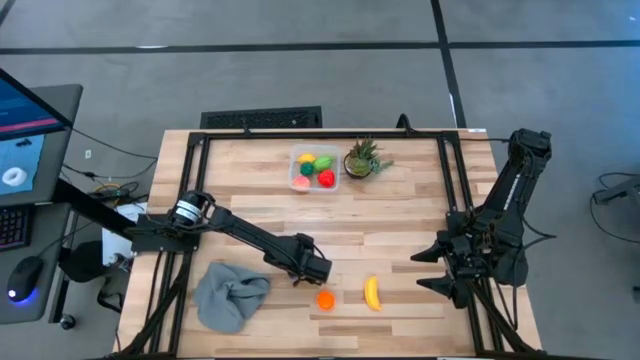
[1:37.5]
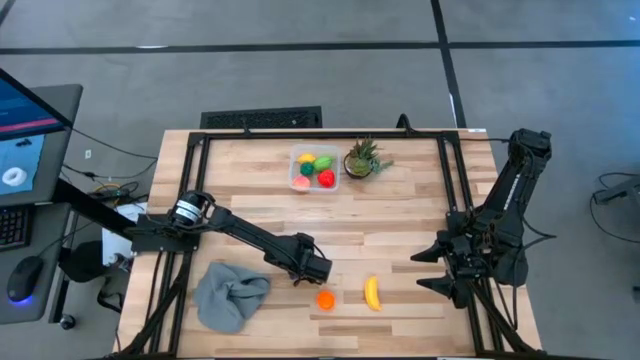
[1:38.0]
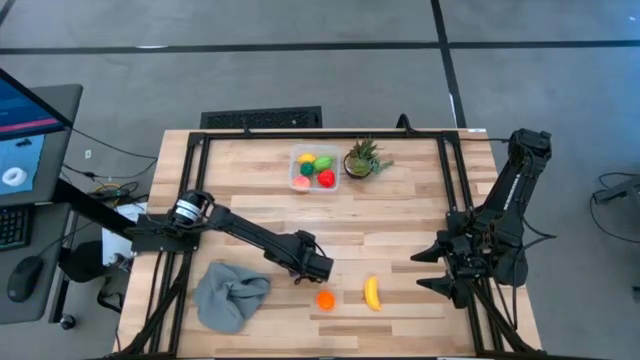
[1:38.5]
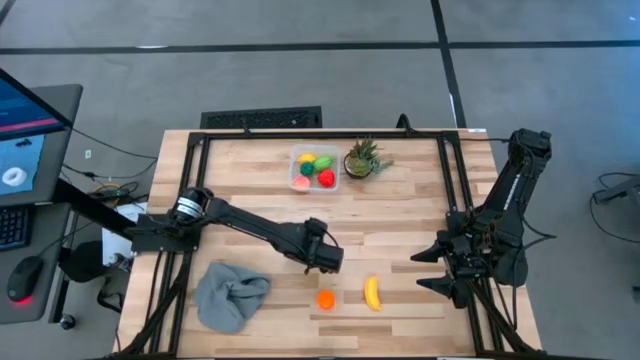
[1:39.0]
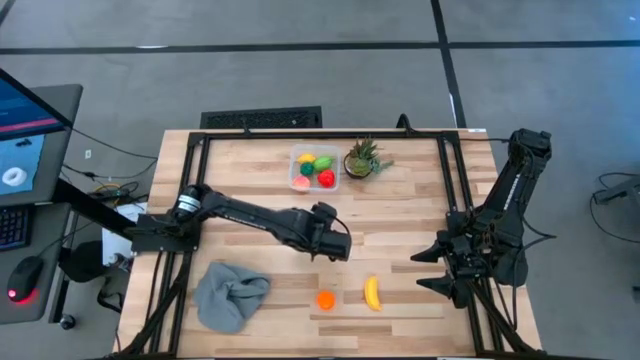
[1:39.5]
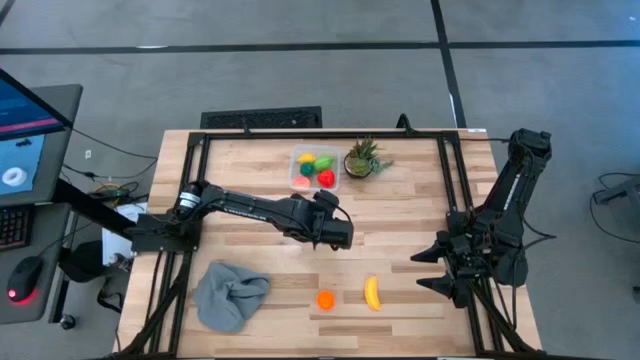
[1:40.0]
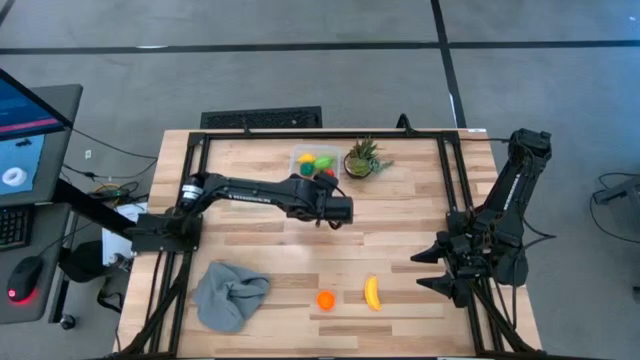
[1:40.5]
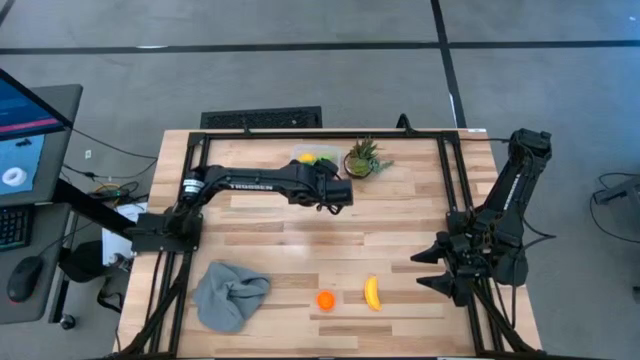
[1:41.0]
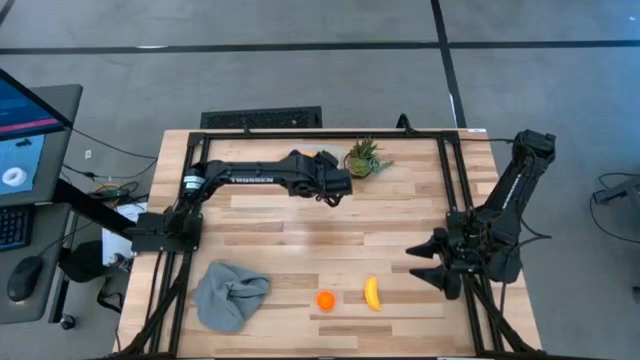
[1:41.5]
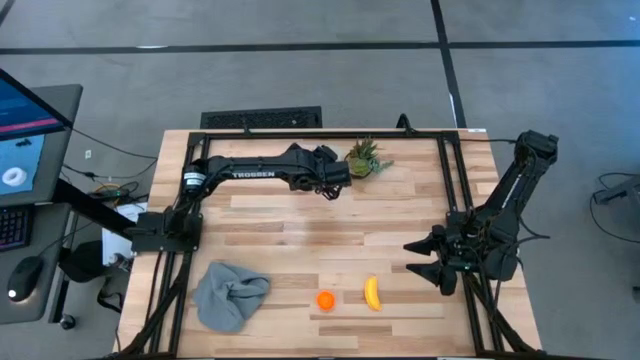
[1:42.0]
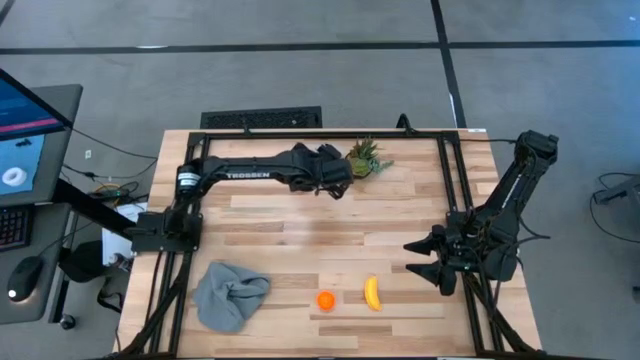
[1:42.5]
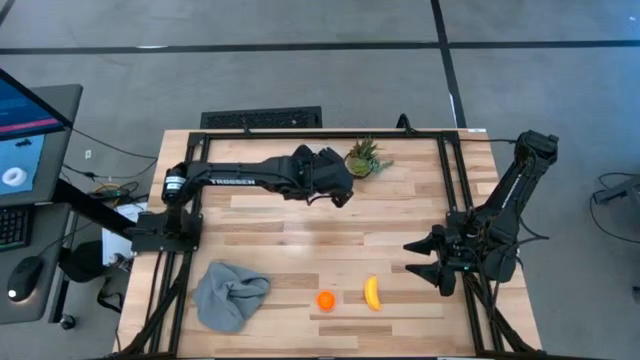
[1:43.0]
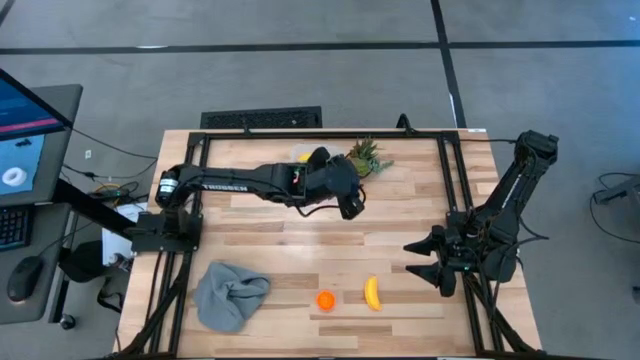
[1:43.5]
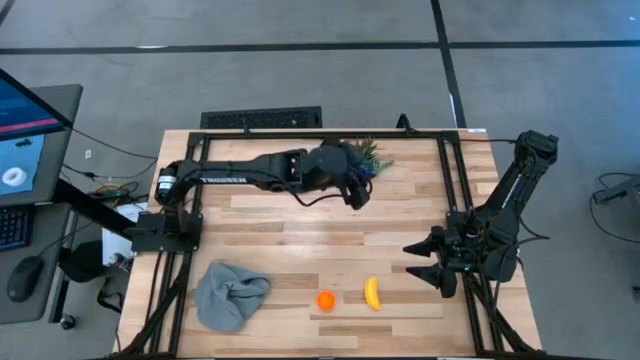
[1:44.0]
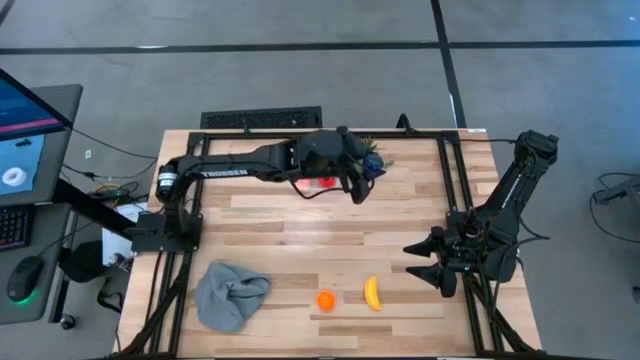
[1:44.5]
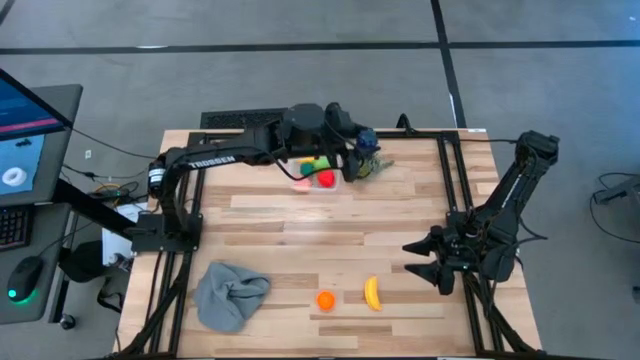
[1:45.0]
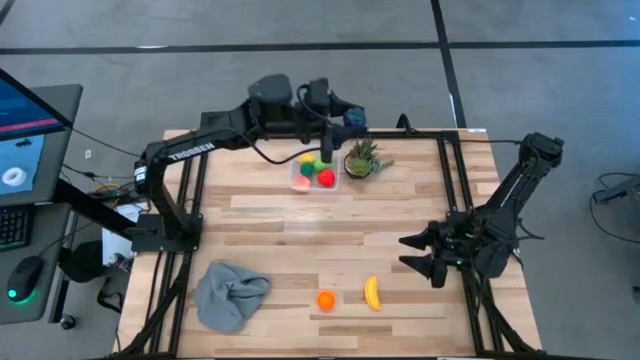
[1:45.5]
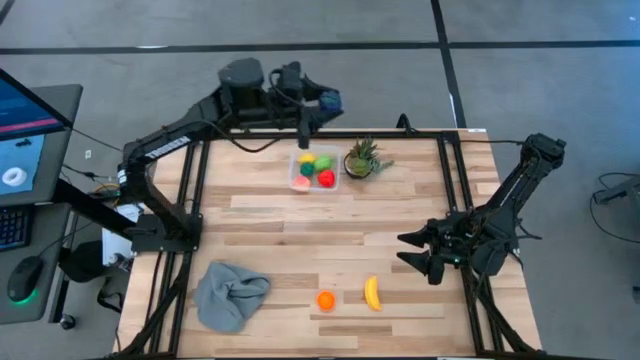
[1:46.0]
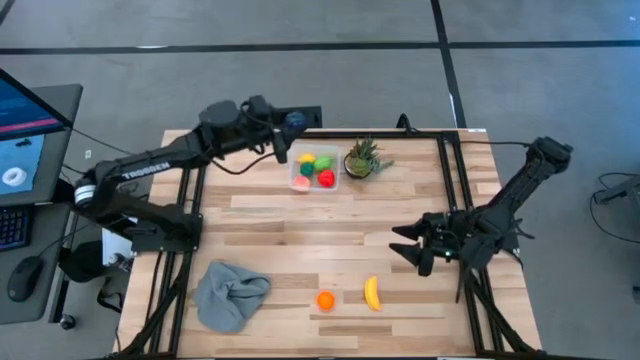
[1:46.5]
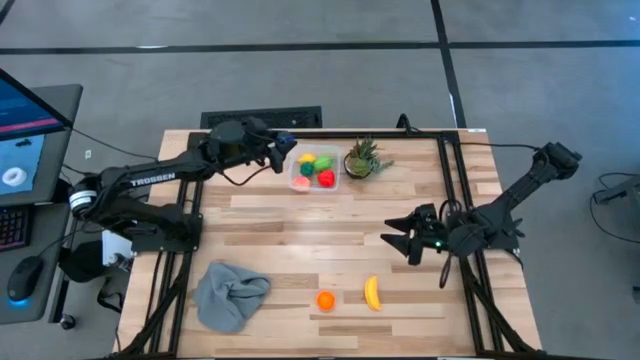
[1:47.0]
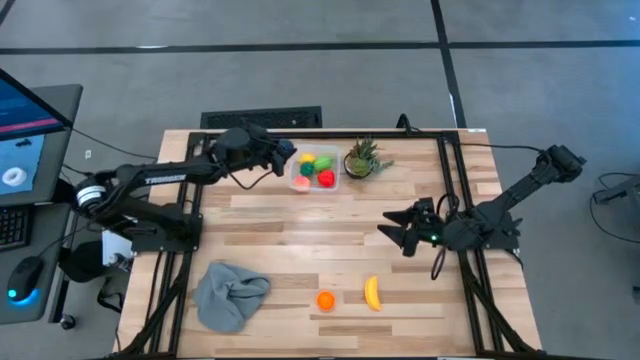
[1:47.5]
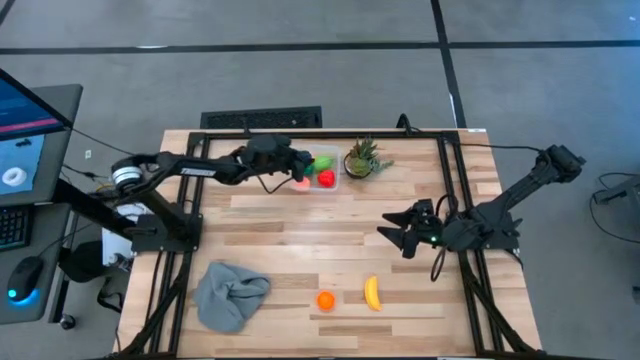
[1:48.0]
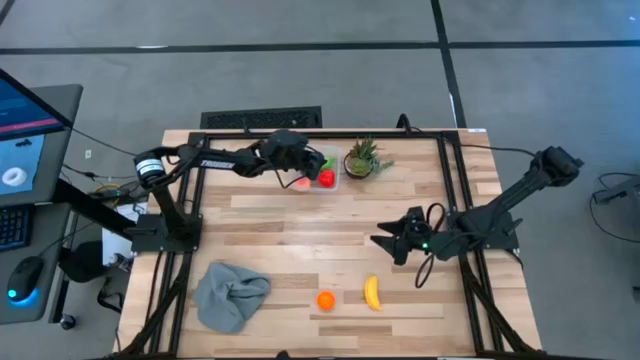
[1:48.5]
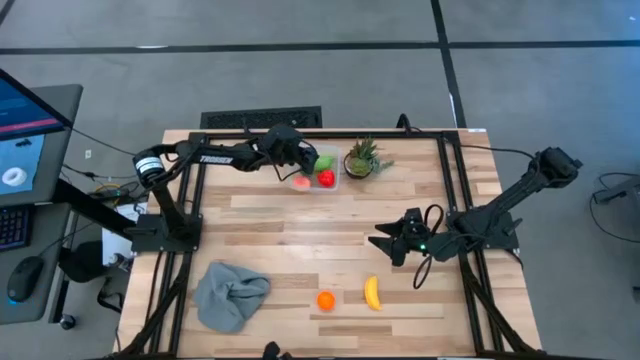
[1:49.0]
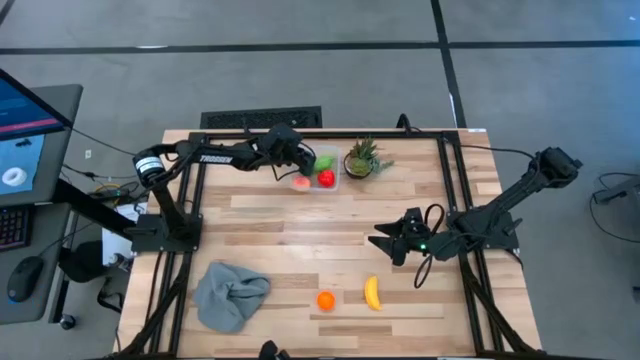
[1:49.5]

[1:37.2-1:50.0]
Task: Pick and placing Produce into tupperware
Put the violet grapes into the transparent container

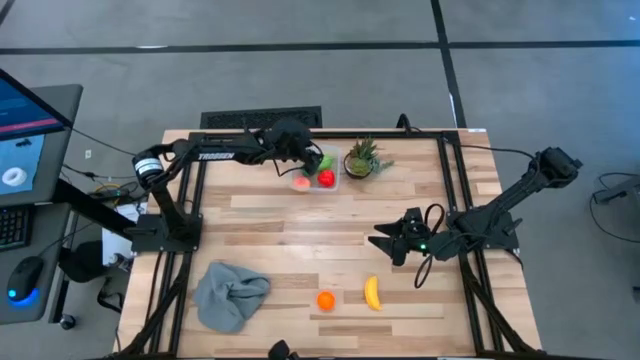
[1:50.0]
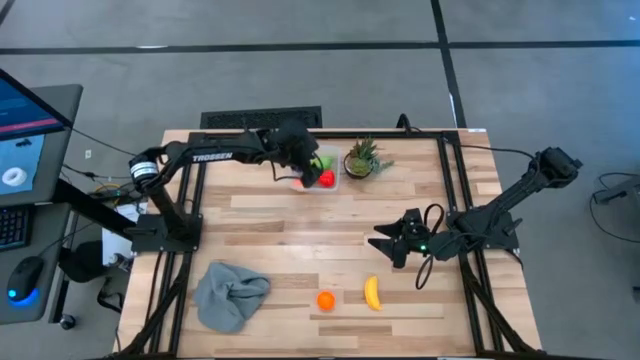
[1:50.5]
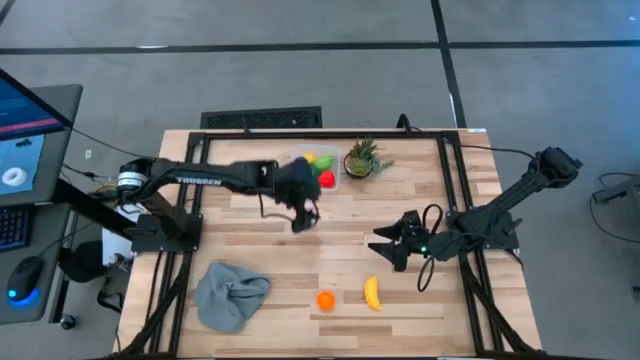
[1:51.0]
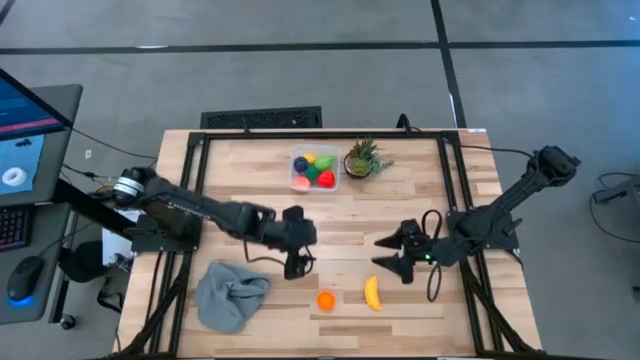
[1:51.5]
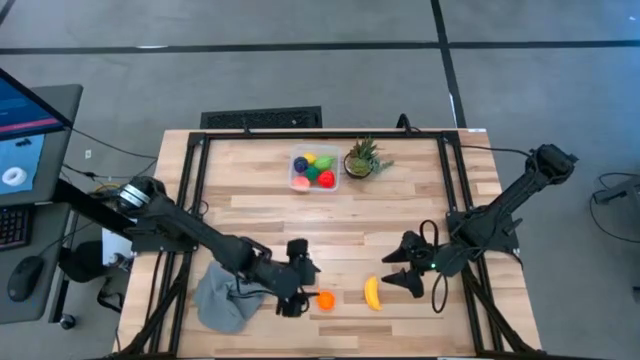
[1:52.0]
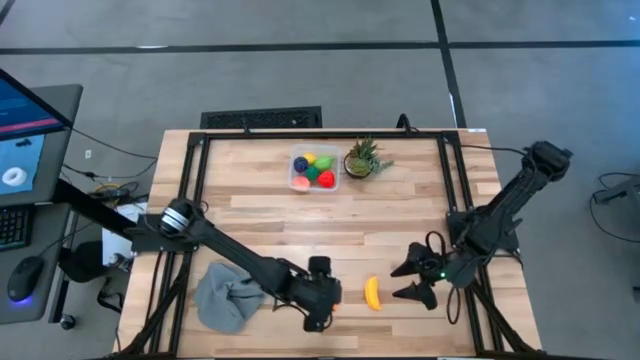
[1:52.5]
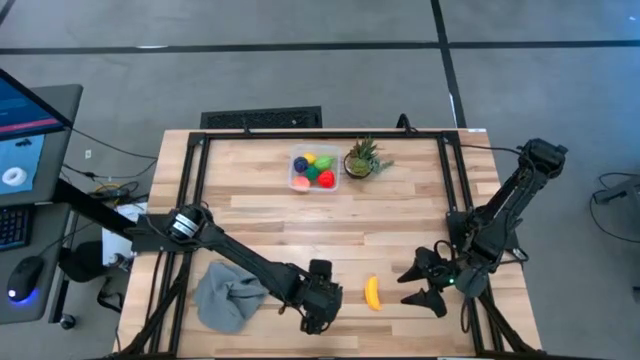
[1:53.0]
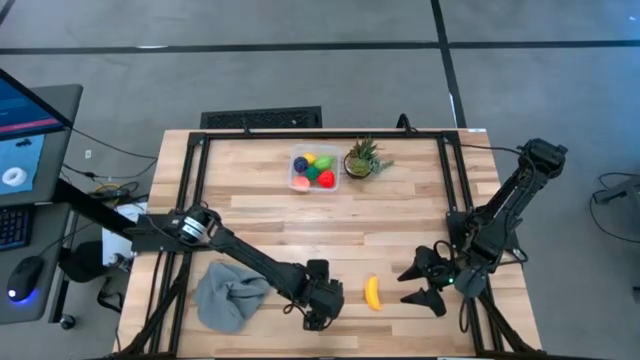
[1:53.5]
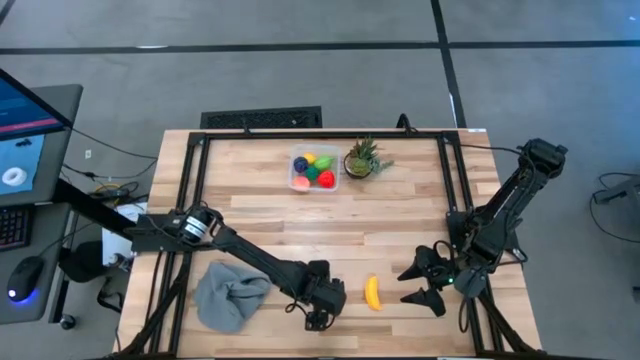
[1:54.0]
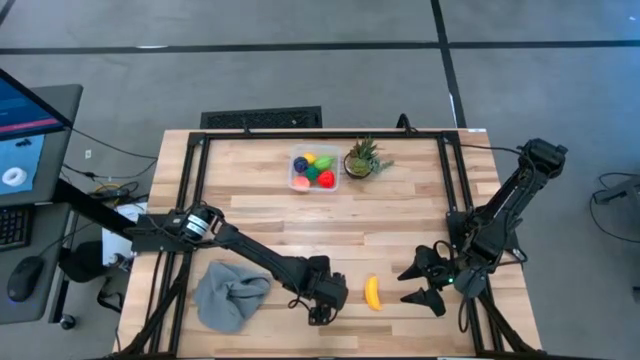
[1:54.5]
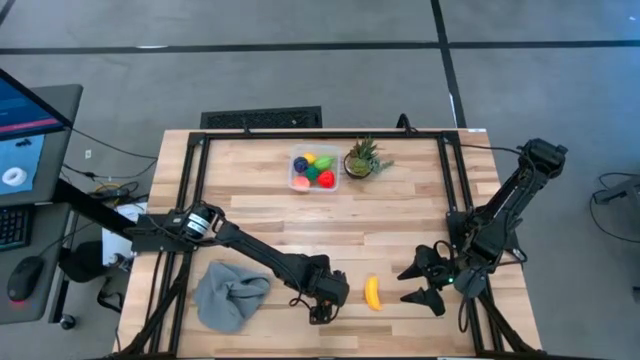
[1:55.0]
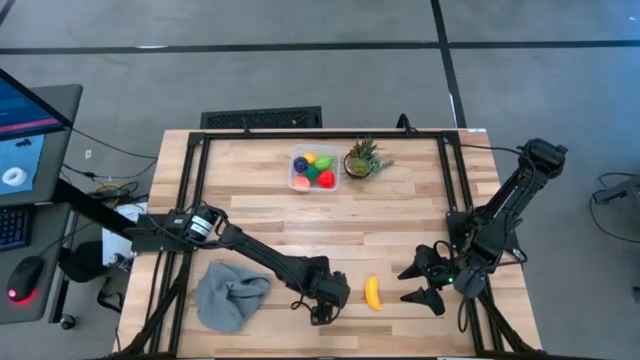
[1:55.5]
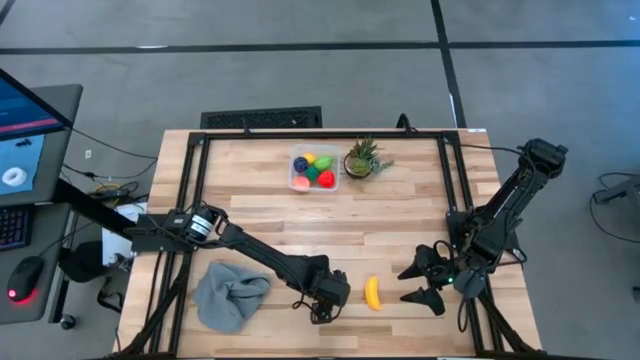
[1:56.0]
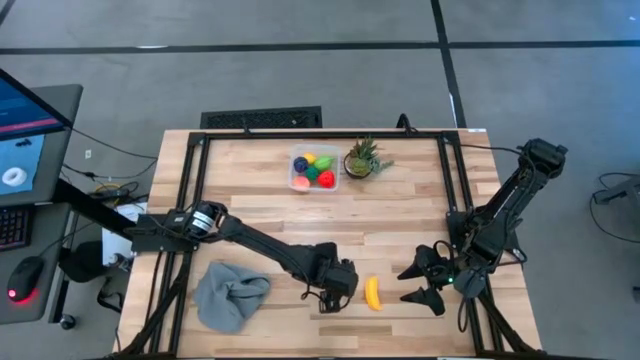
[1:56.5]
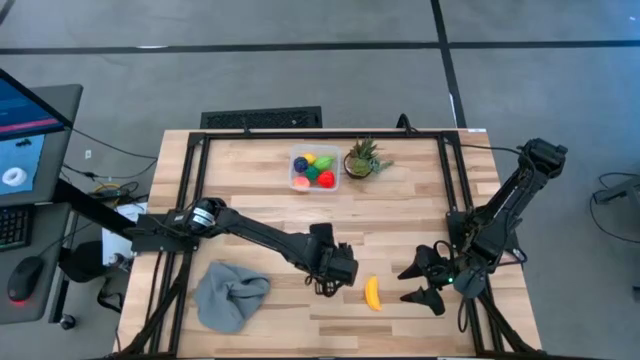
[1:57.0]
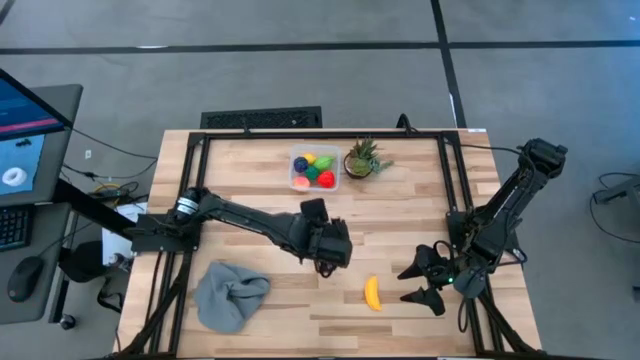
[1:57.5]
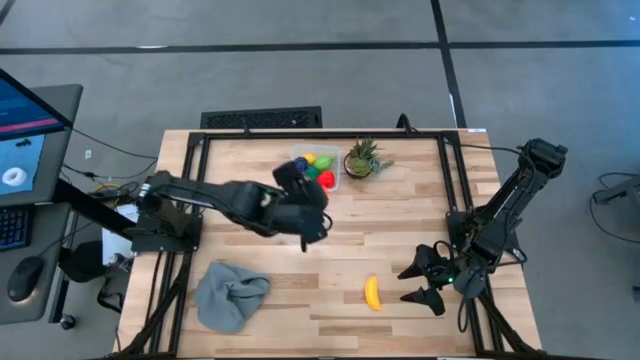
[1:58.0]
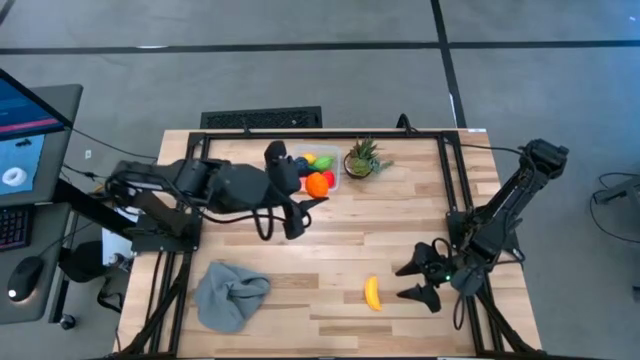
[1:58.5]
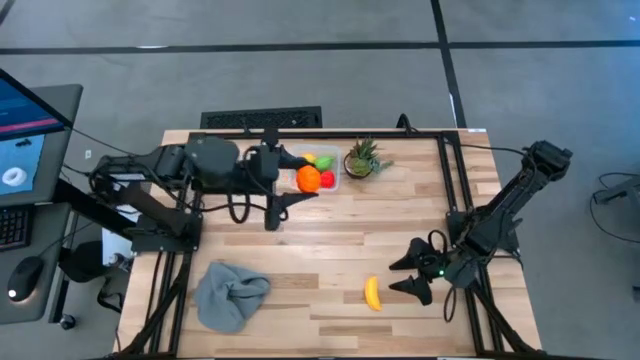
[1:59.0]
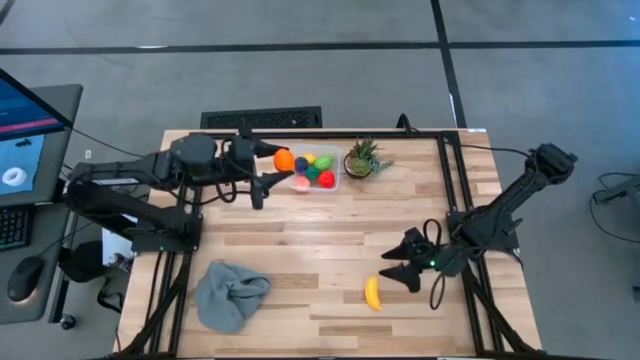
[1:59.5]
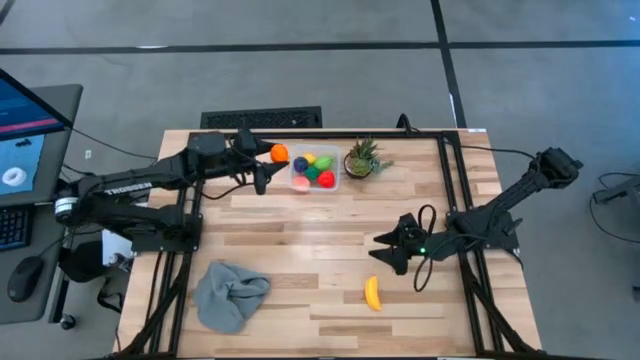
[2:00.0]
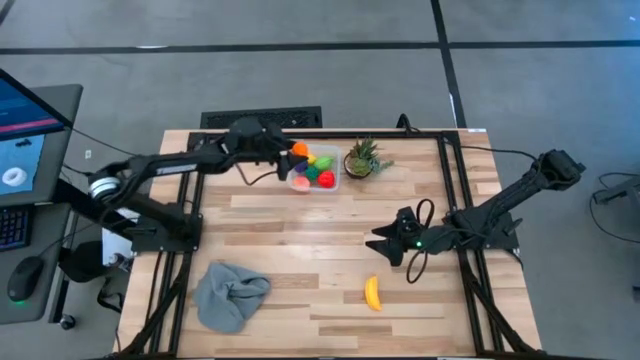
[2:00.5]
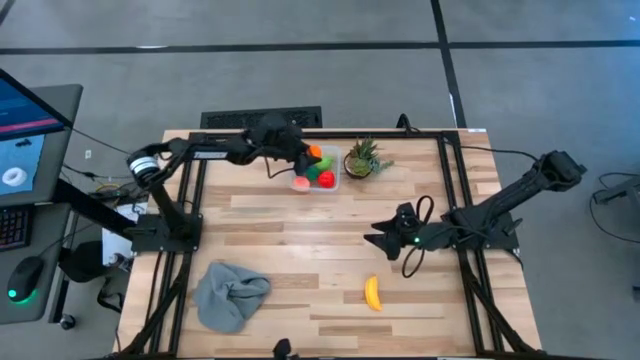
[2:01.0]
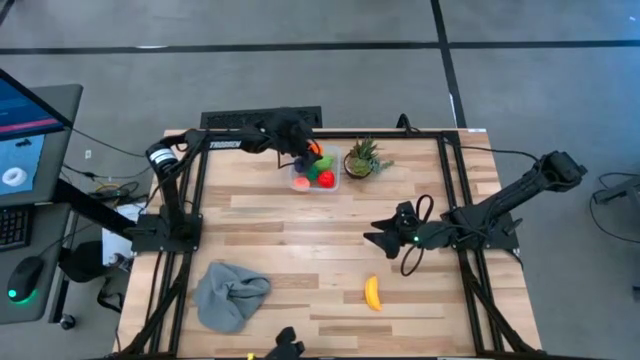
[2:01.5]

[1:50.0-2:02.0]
Put the tangerine into the transparent container
